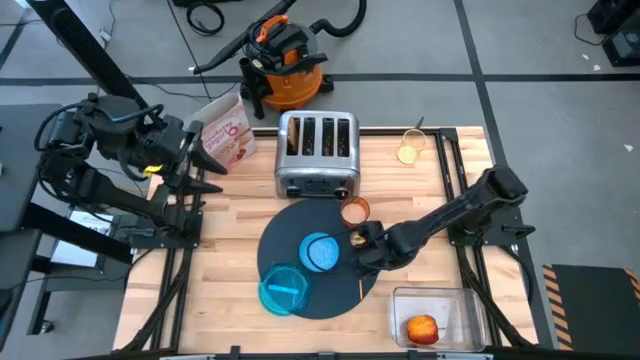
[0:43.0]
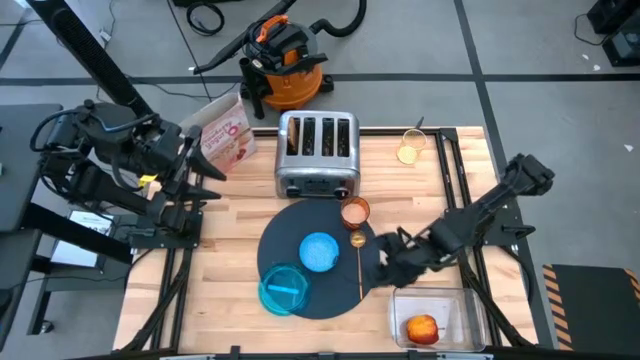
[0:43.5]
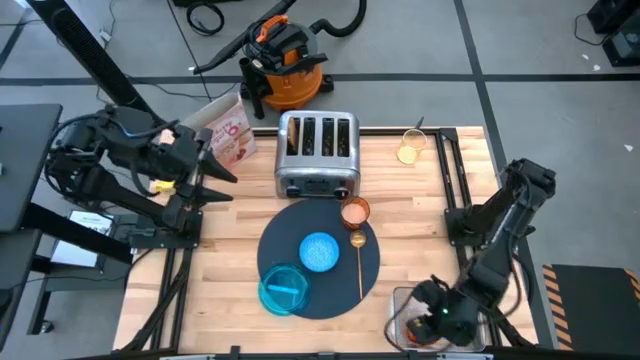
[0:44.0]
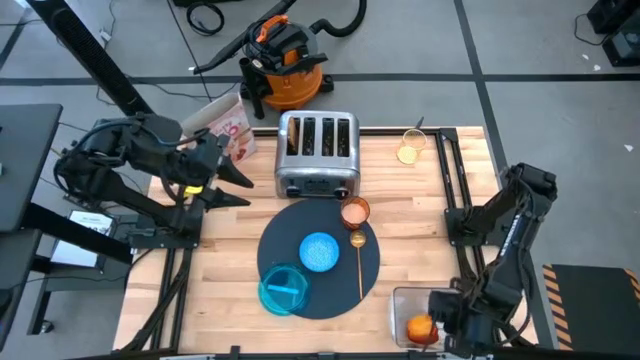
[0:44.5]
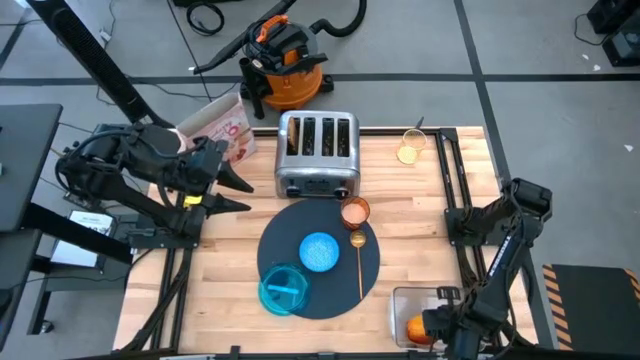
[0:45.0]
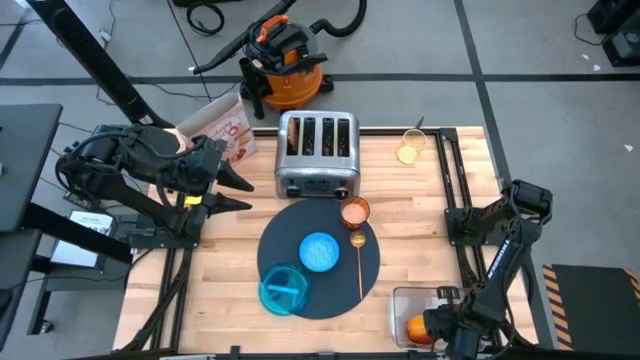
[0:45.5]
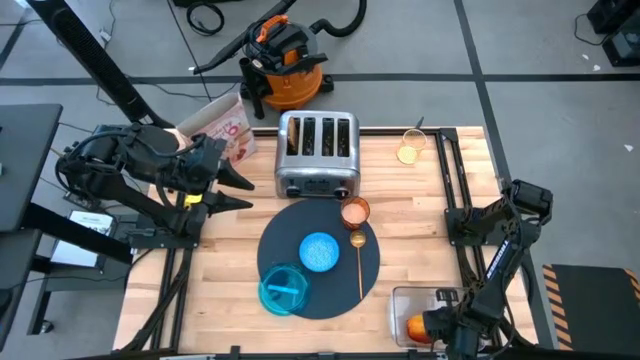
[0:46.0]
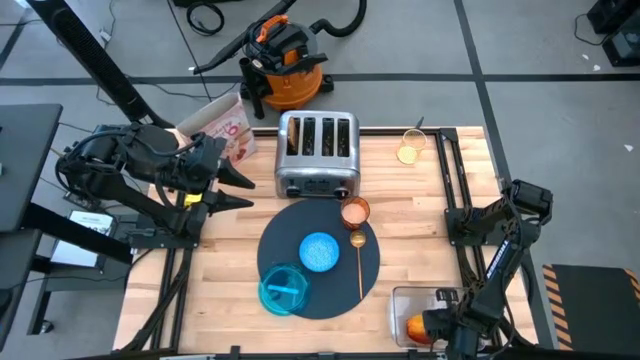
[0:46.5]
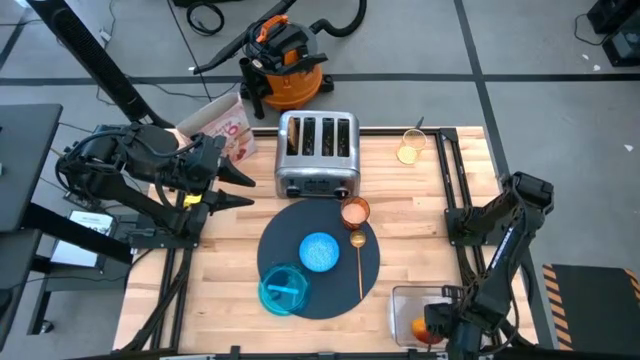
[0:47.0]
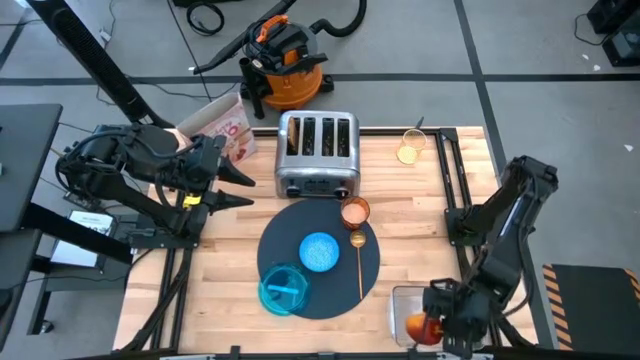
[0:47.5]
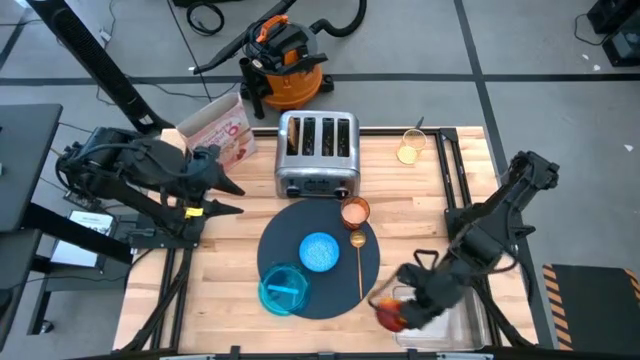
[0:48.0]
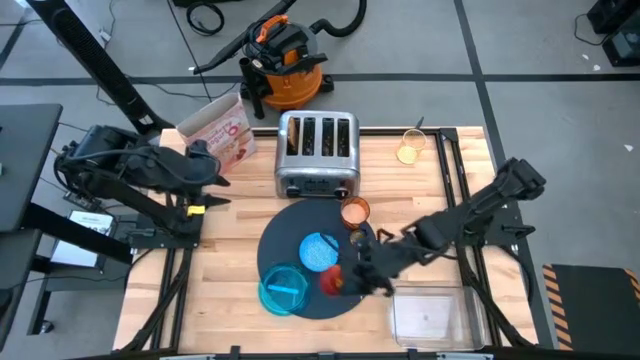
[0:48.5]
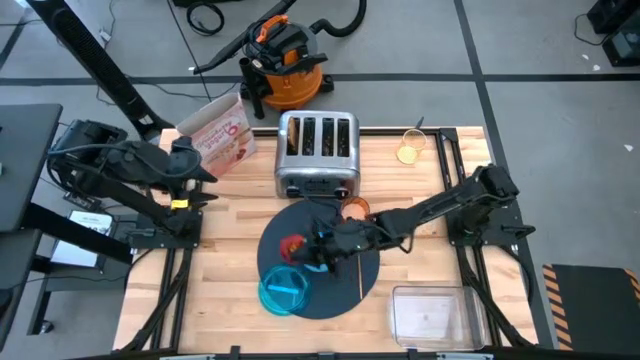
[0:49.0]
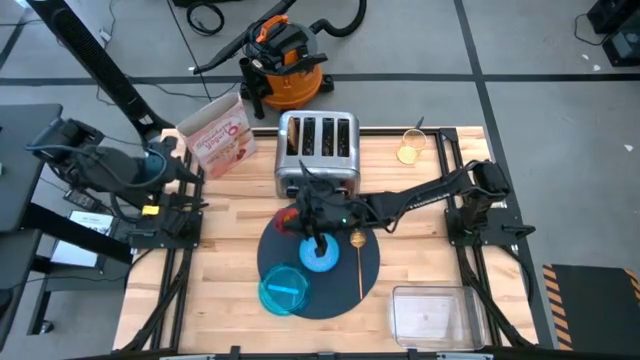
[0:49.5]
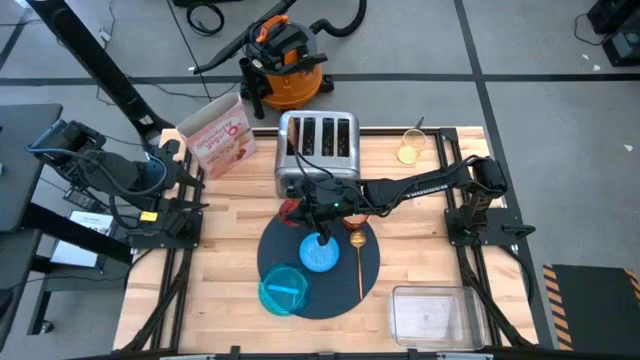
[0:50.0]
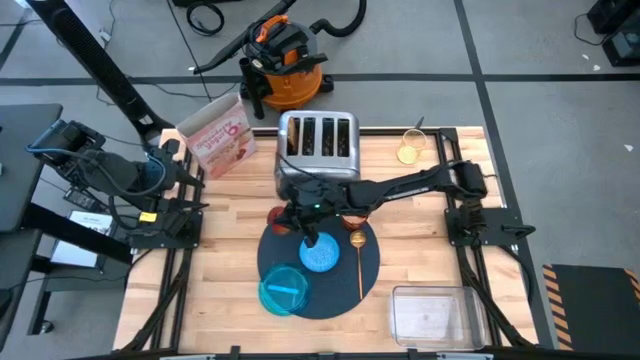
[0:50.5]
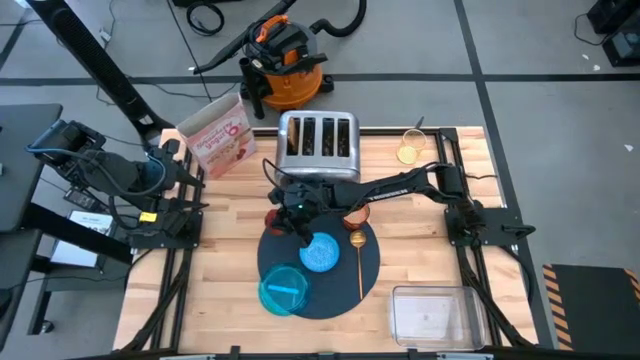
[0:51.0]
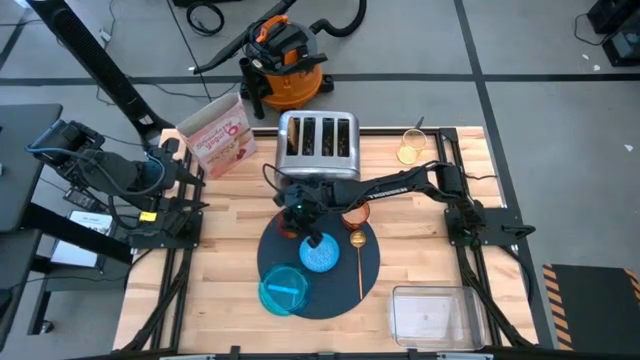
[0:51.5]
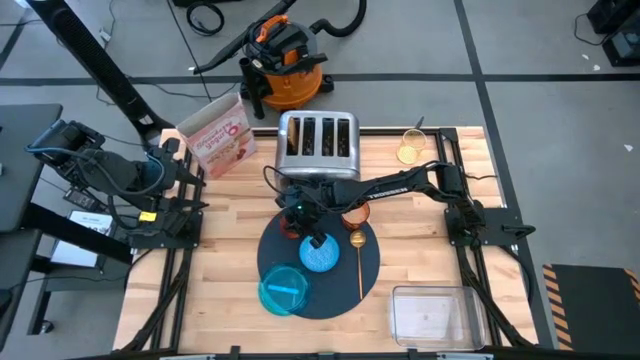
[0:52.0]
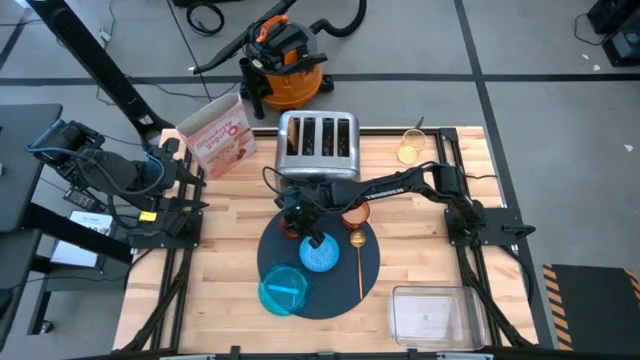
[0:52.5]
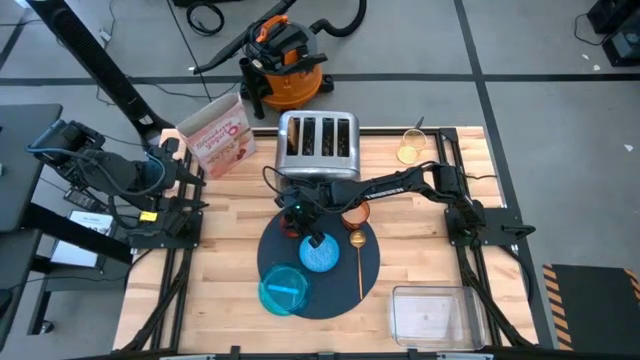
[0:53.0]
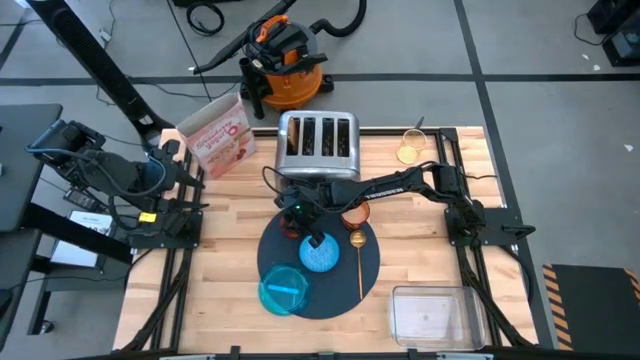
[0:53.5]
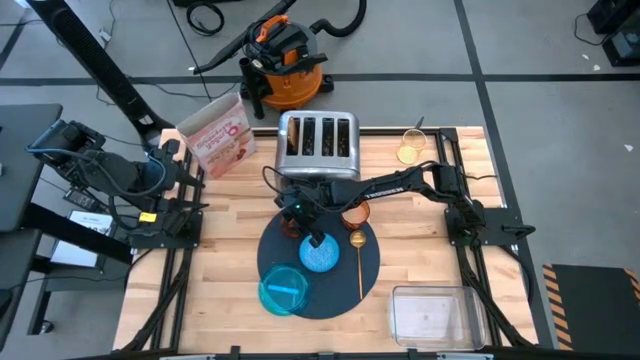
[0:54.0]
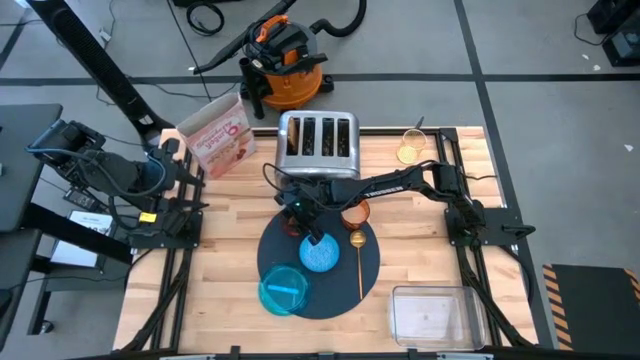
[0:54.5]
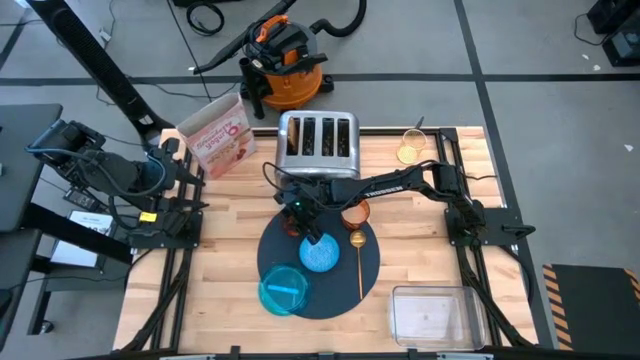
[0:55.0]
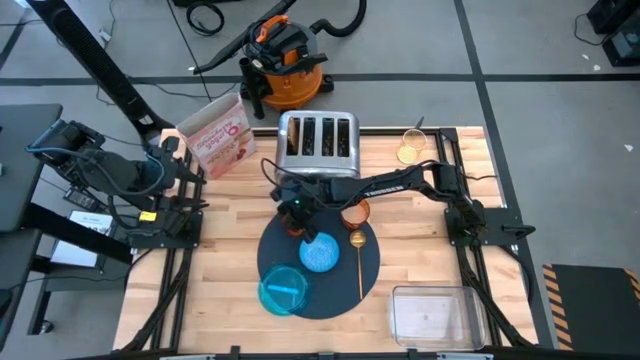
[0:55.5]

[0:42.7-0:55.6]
Task: Arrange a breakfast setting
Put the red apple on the top left side of the blue bowl

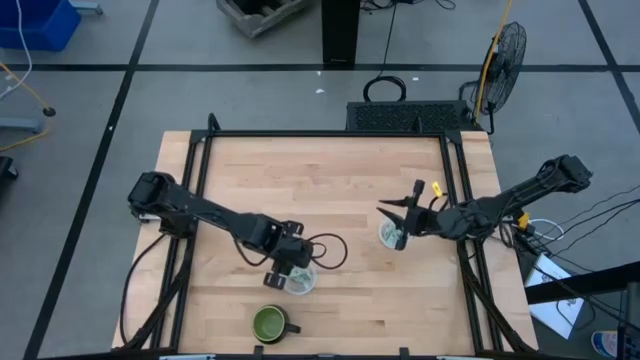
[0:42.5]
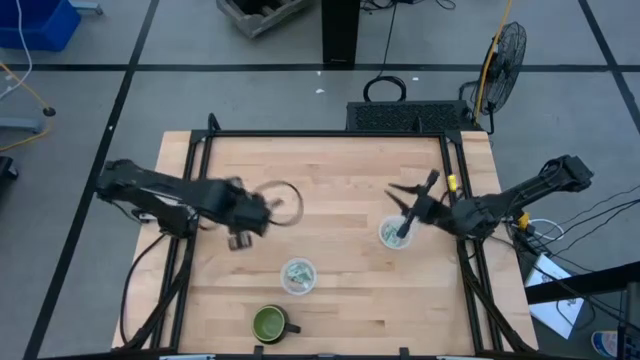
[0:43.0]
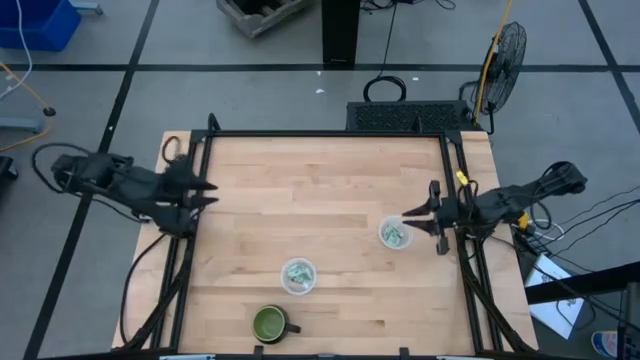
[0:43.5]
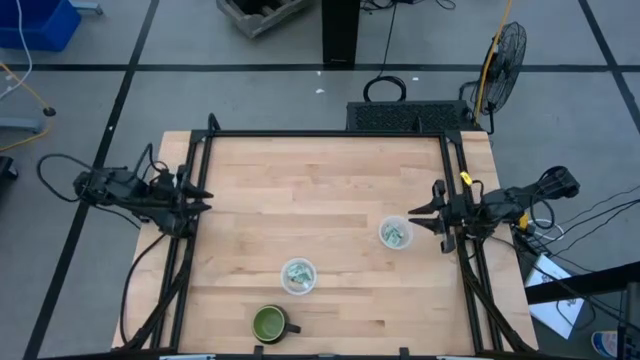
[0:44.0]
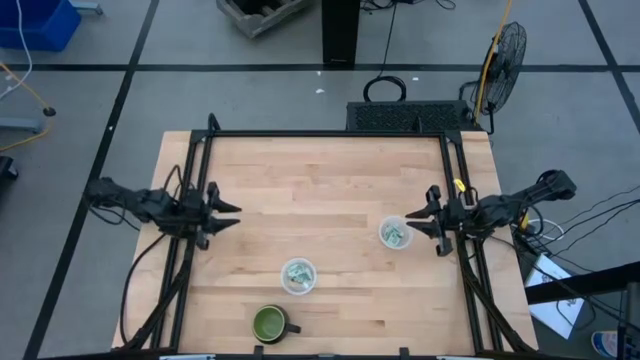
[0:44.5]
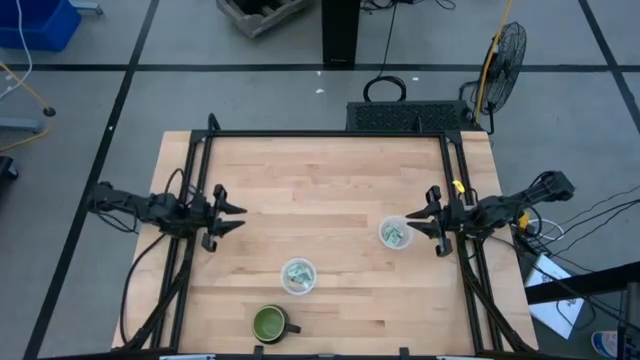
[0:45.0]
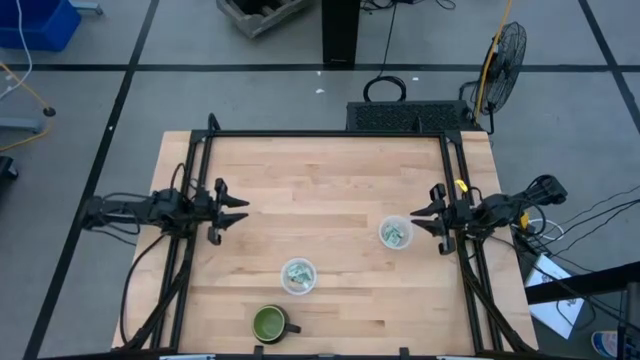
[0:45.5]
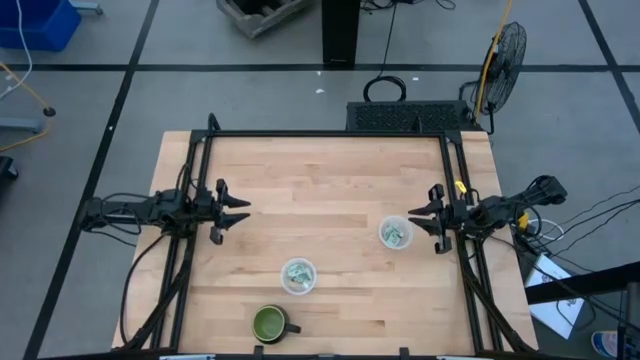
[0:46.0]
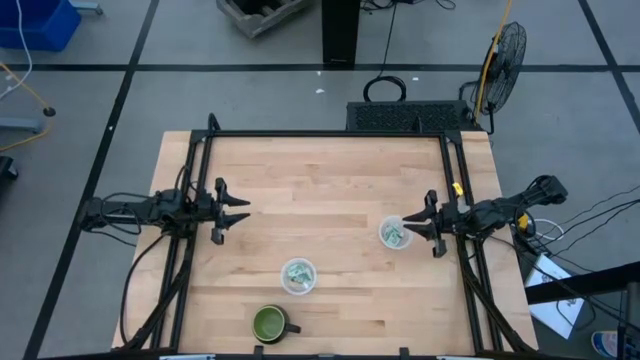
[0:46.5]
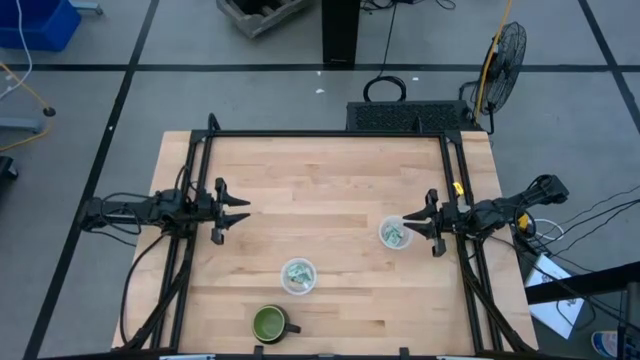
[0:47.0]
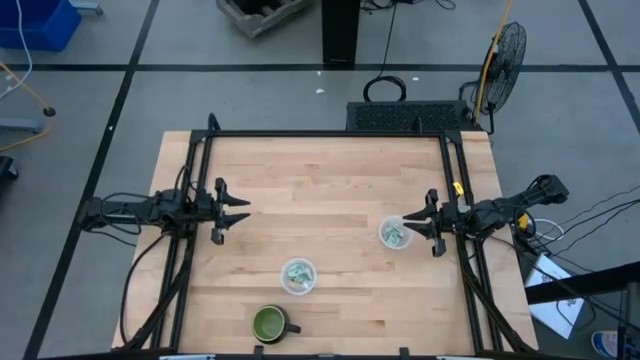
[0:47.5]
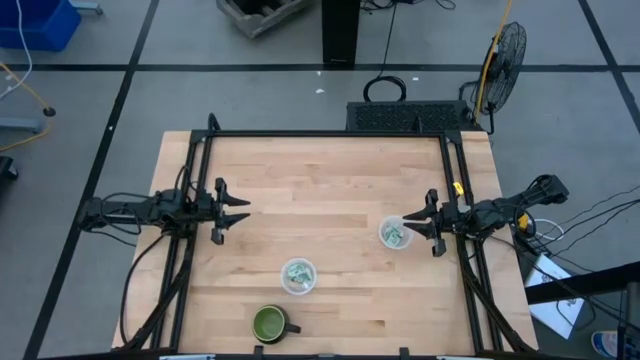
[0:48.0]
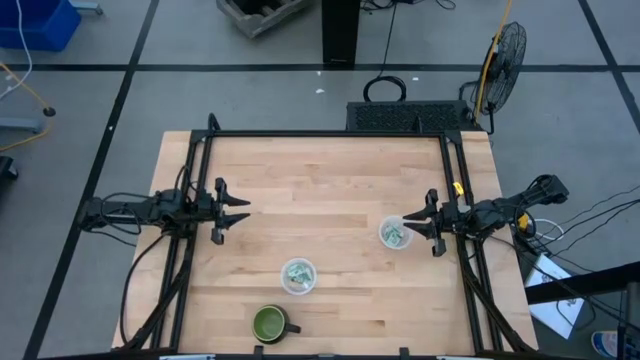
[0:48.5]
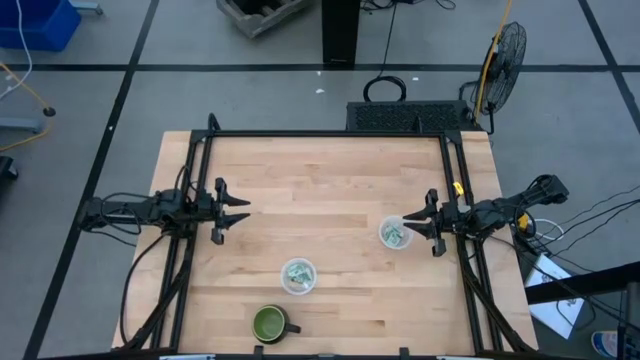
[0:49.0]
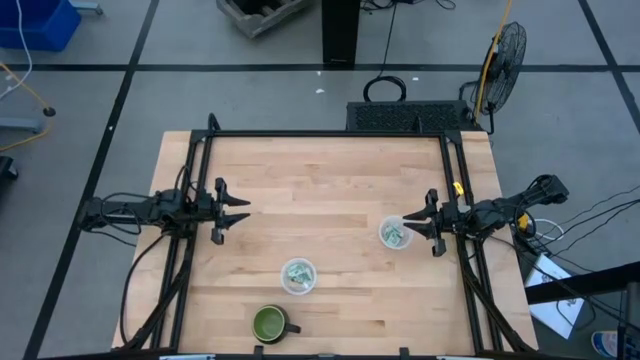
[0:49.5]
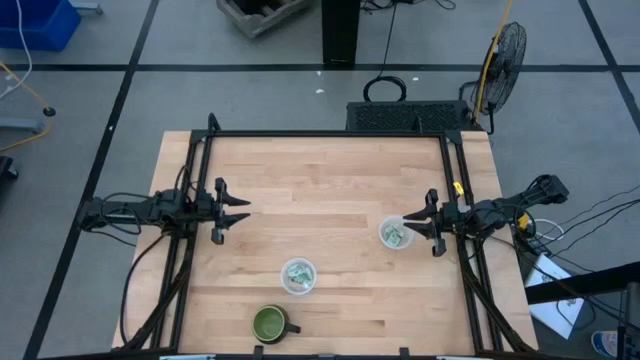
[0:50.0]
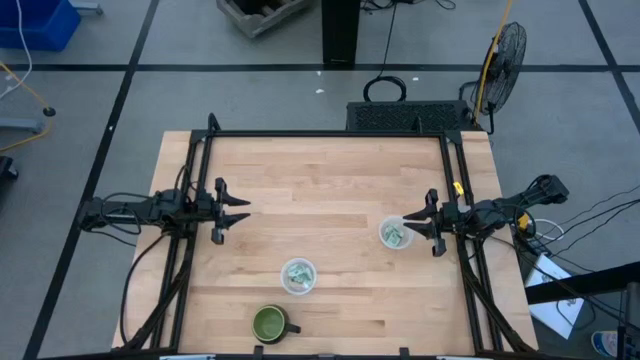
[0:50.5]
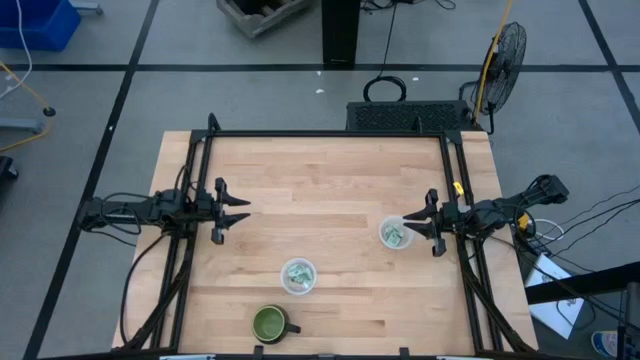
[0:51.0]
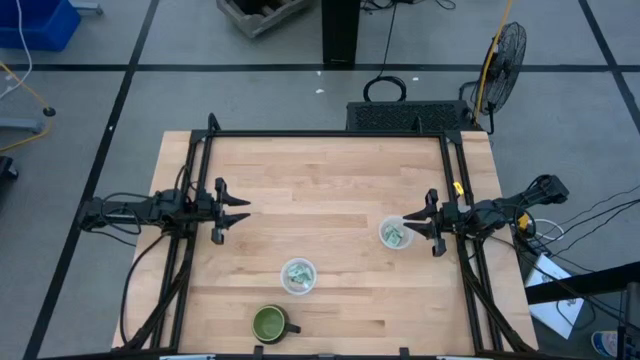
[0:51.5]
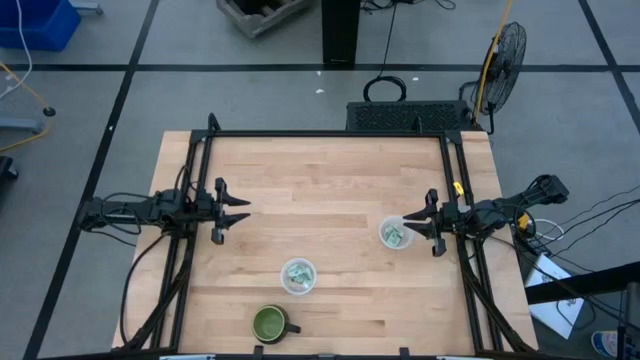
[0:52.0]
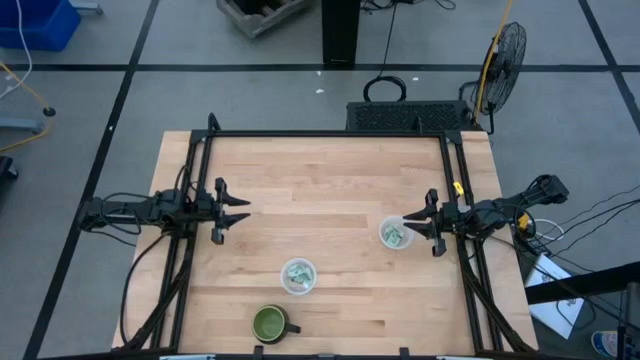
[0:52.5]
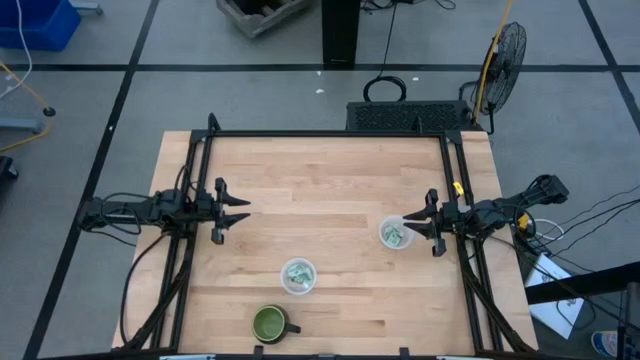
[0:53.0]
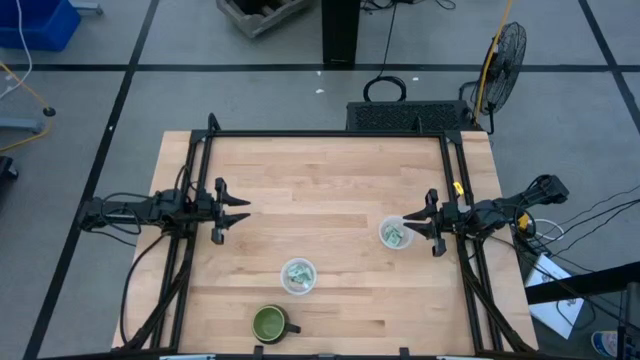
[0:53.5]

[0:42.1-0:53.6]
Task: Pick and place Stevia / Truvia into bins
Return to Home Position
